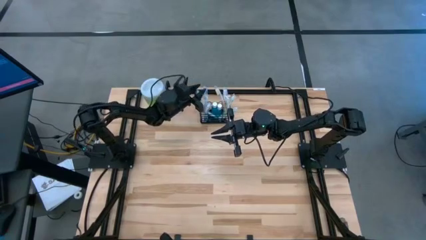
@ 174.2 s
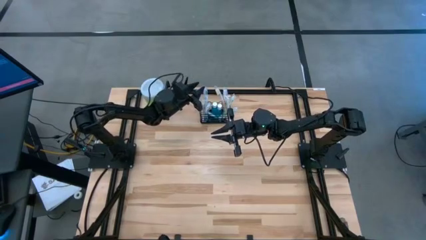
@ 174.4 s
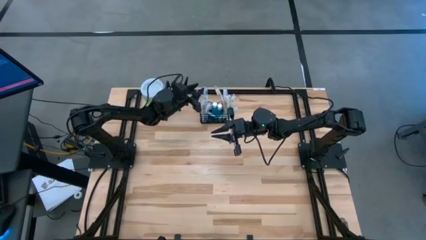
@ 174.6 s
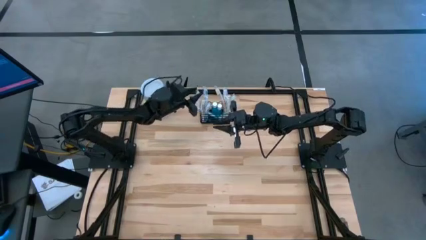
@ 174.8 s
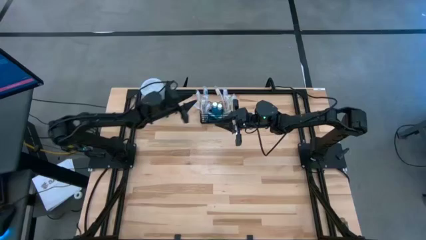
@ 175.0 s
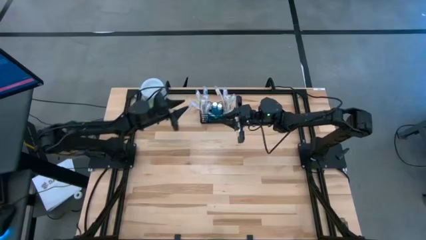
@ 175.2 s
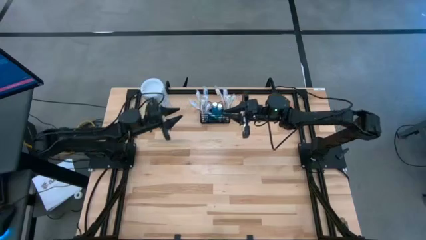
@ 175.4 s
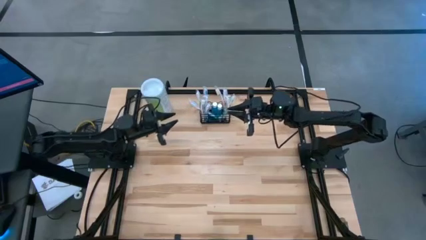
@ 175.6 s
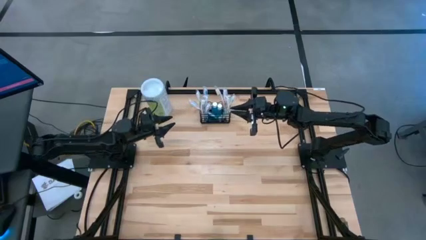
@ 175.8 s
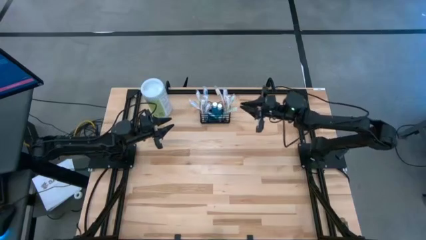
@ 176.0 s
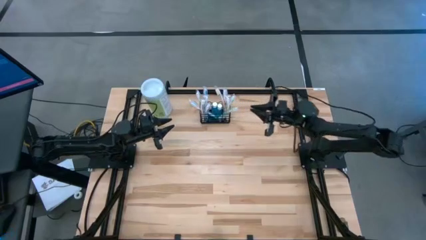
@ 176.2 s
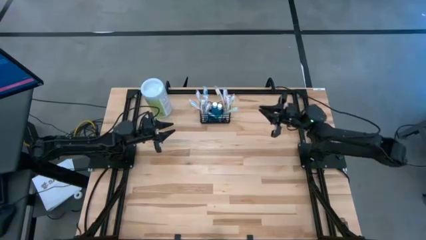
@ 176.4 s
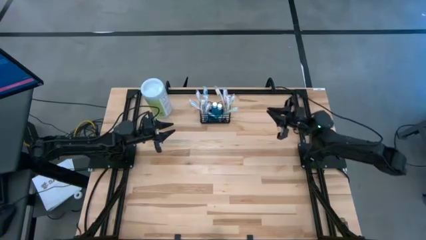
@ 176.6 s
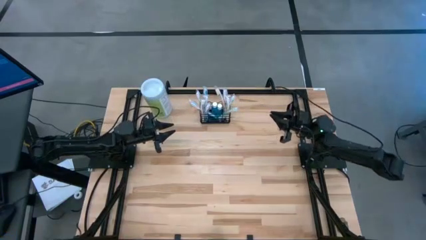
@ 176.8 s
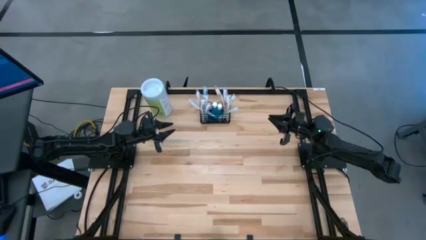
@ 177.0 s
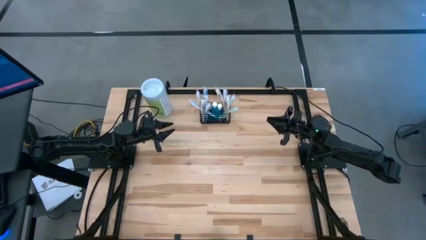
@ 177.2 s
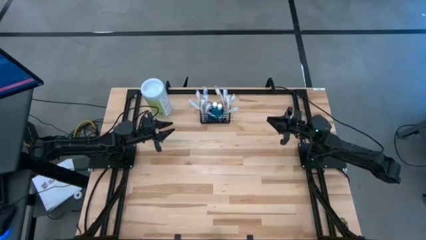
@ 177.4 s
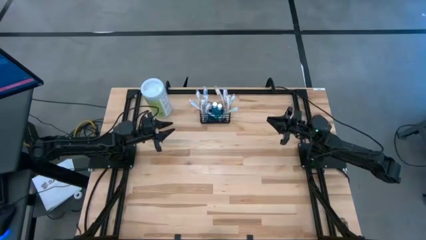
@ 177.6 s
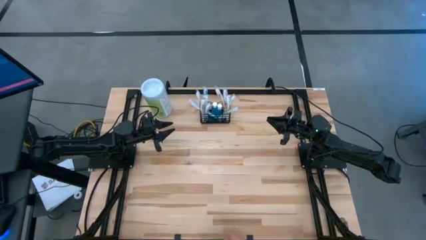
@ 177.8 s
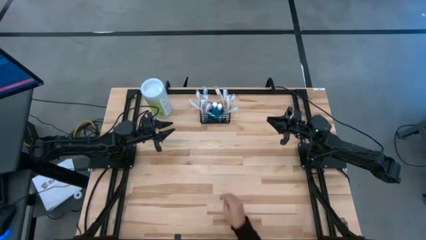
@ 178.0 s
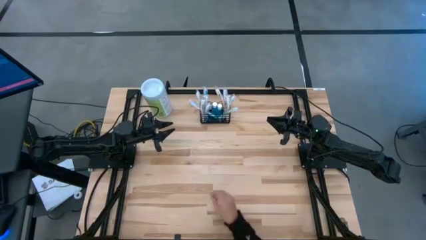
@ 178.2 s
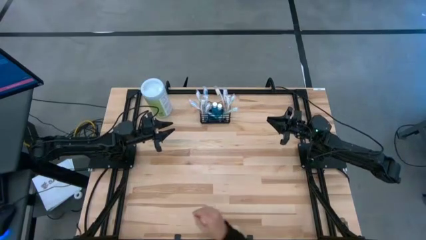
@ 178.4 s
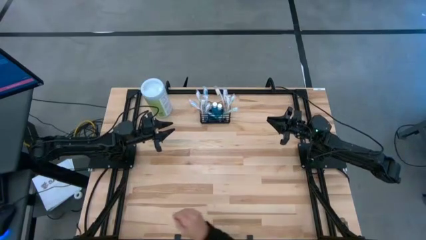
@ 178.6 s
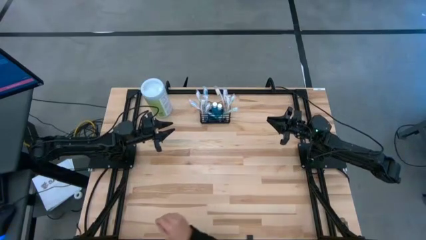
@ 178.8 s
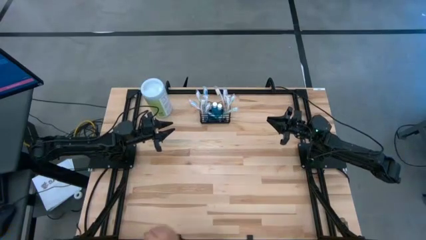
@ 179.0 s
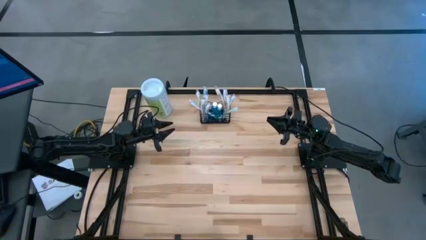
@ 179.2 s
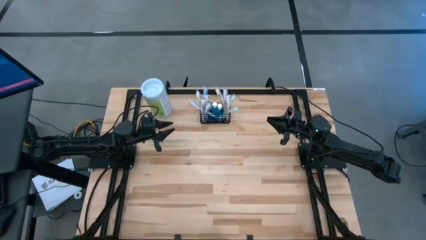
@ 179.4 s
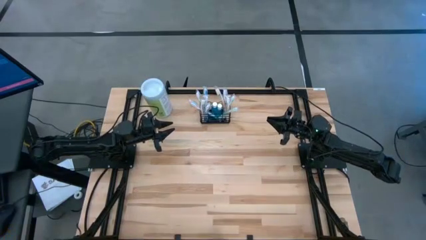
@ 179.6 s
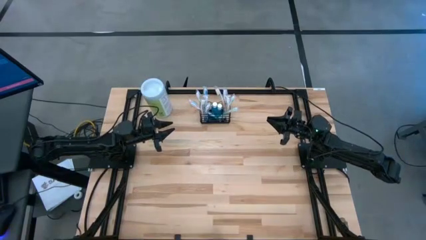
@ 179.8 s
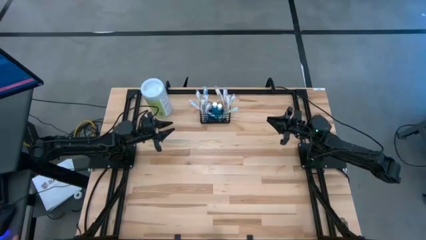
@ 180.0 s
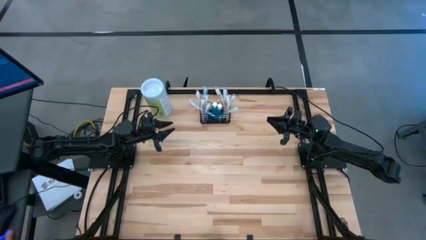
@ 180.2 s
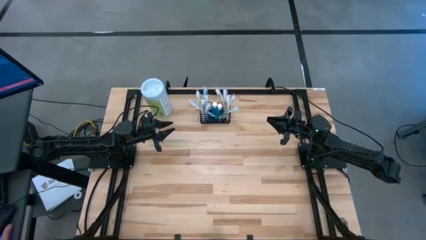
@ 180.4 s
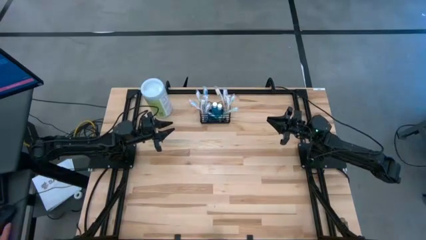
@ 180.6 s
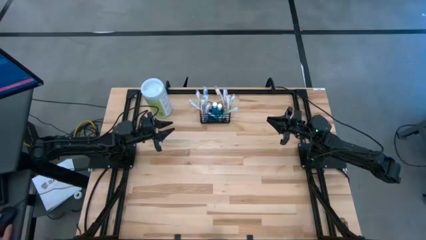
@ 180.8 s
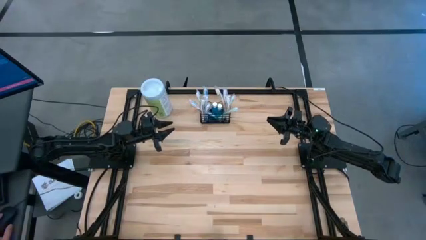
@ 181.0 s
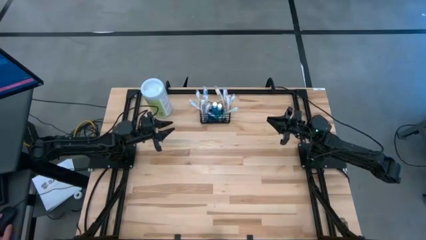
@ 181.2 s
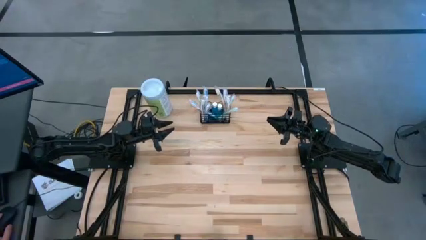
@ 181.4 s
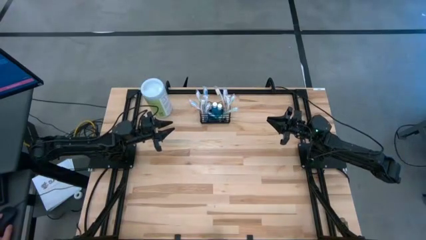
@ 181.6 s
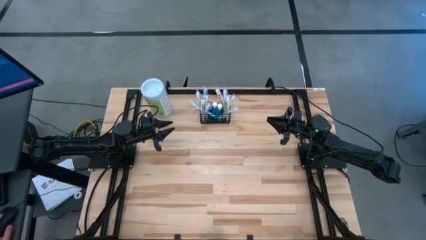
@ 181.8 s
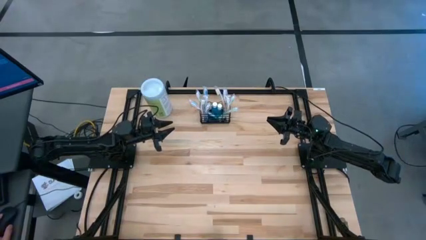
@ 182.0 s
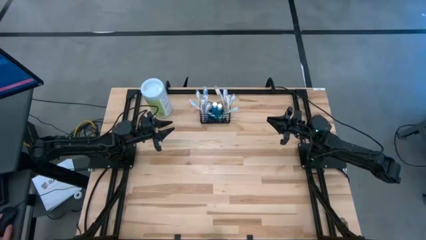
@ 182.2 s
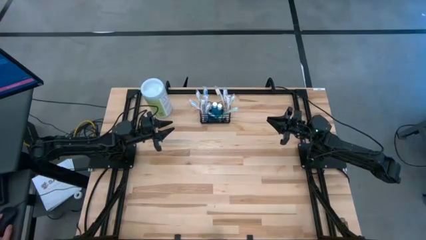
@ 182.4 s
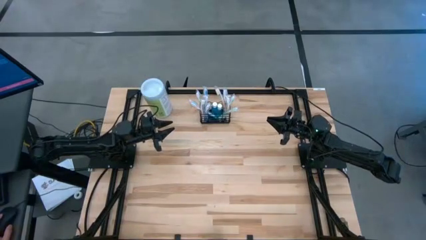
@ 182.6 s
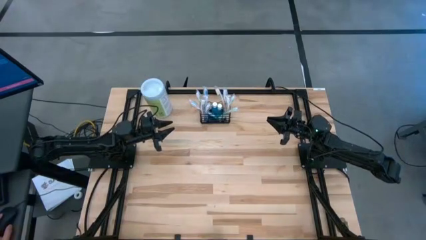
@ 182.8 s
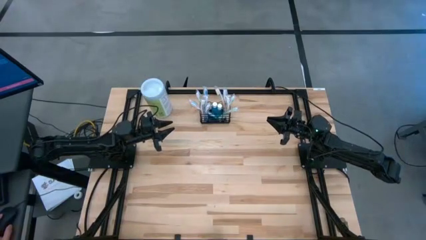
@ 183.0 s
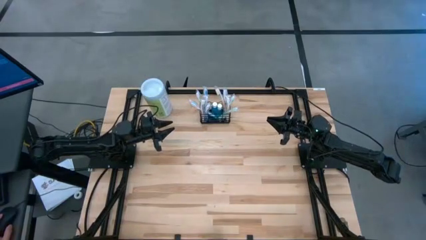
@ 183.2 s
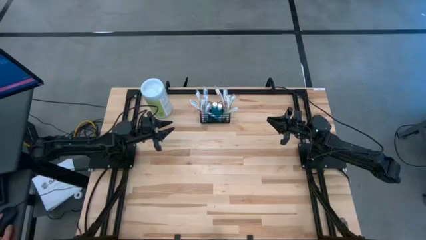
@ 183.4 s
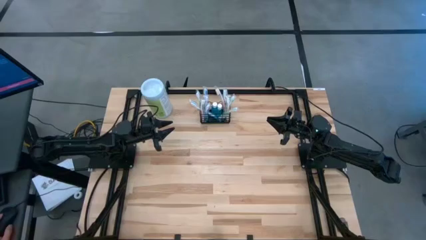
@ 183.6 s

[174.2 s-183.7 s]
Task: Pick & Place toothbrushing station
Return to Home Position

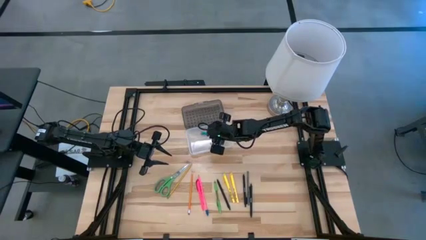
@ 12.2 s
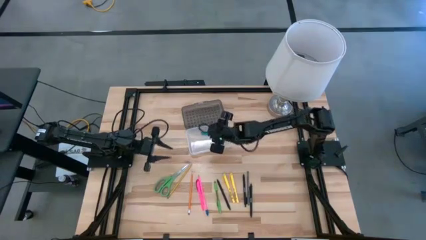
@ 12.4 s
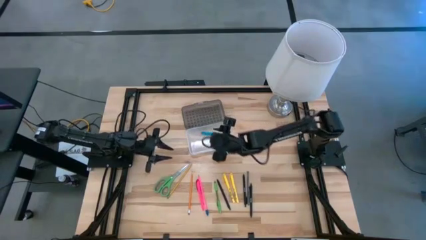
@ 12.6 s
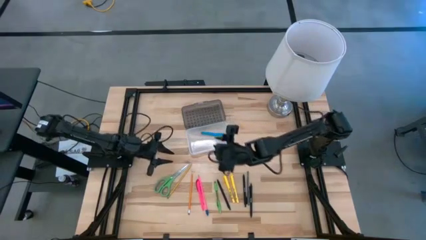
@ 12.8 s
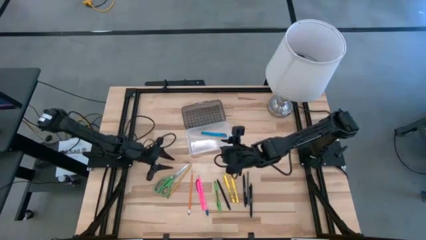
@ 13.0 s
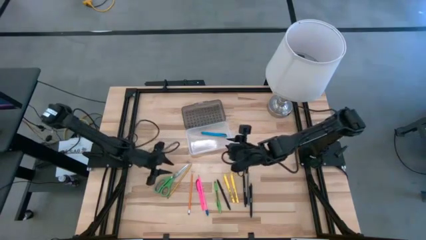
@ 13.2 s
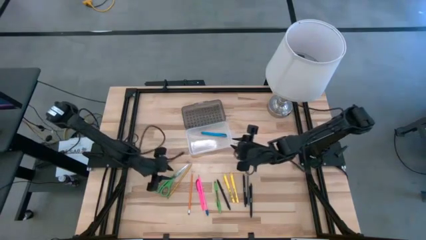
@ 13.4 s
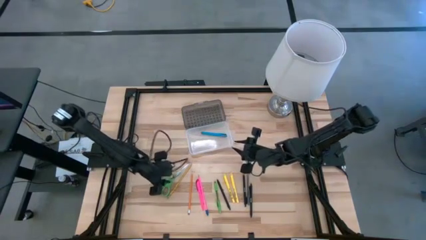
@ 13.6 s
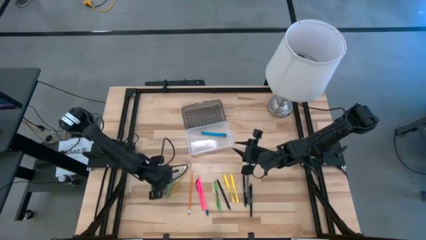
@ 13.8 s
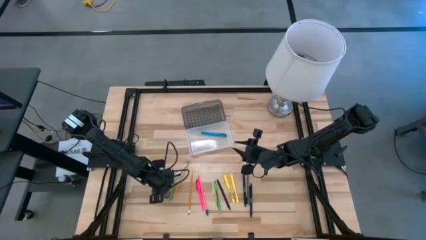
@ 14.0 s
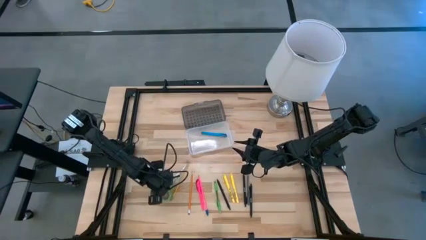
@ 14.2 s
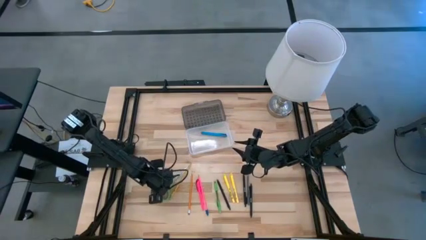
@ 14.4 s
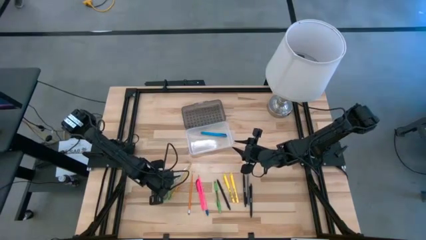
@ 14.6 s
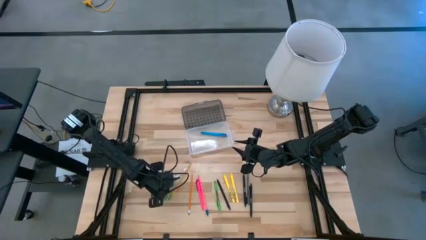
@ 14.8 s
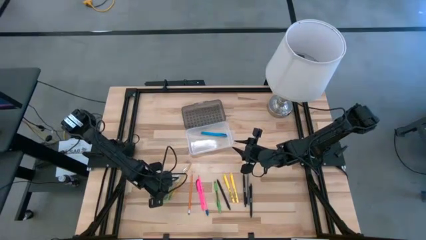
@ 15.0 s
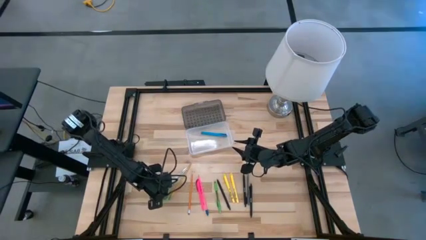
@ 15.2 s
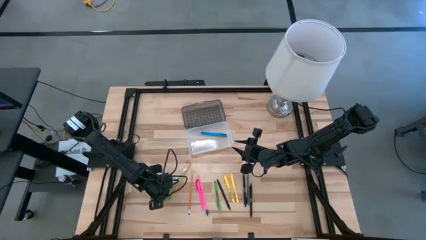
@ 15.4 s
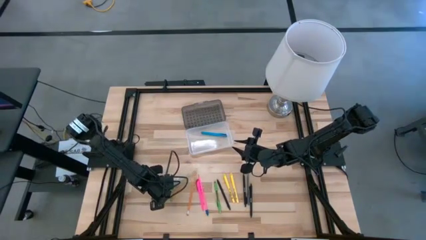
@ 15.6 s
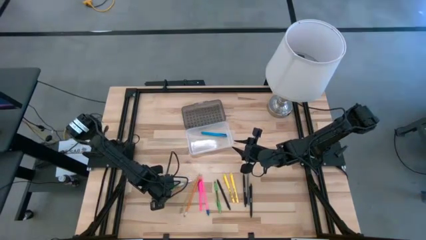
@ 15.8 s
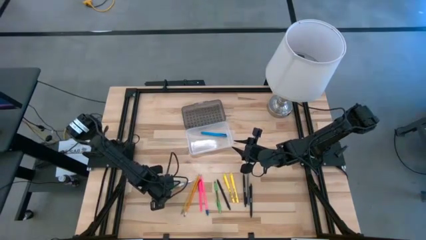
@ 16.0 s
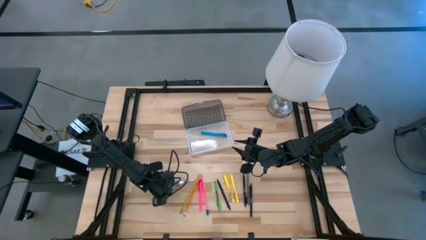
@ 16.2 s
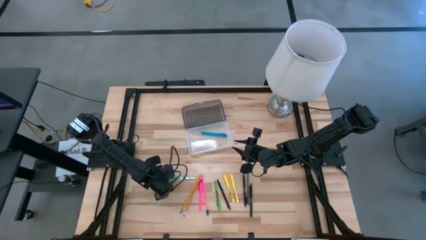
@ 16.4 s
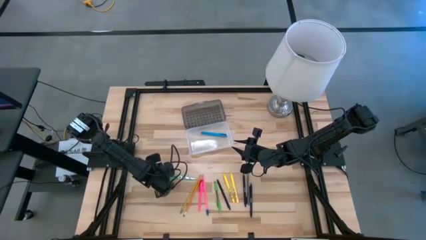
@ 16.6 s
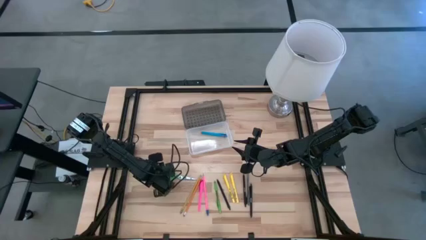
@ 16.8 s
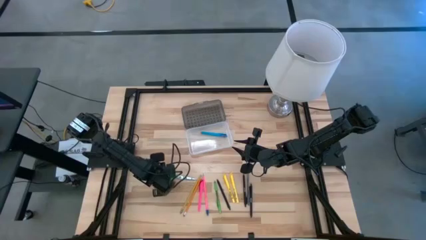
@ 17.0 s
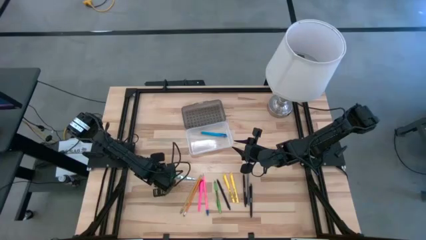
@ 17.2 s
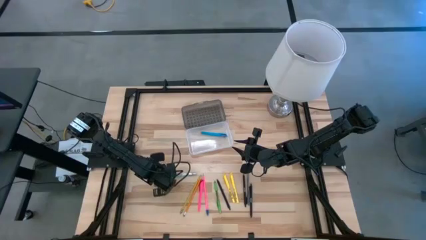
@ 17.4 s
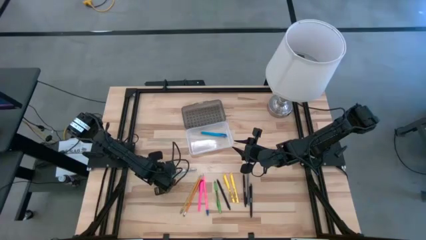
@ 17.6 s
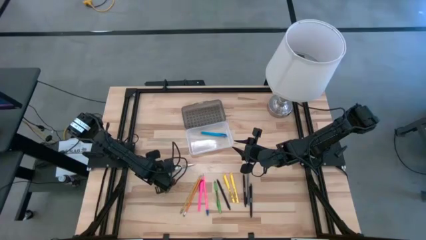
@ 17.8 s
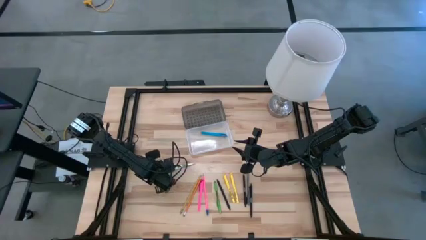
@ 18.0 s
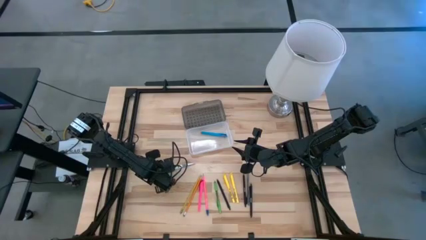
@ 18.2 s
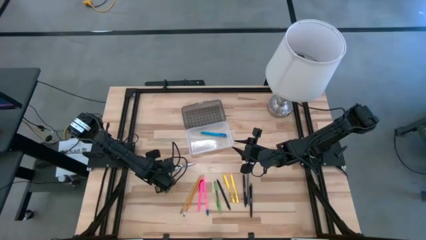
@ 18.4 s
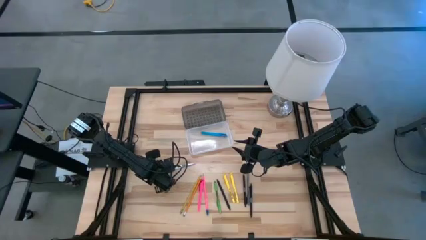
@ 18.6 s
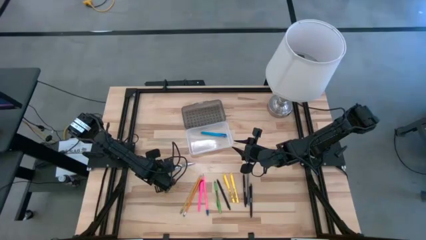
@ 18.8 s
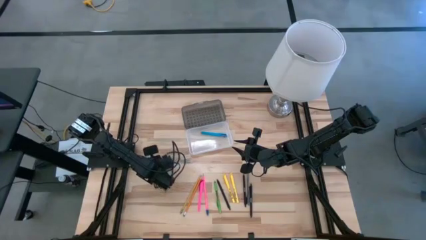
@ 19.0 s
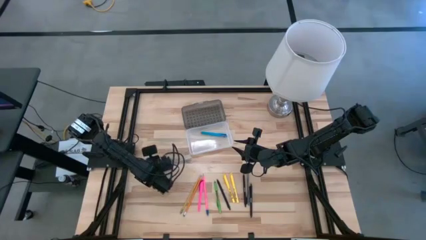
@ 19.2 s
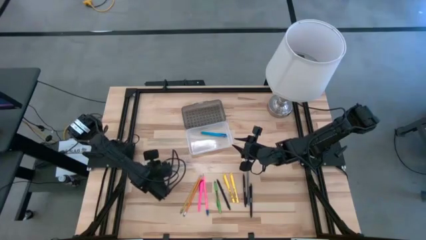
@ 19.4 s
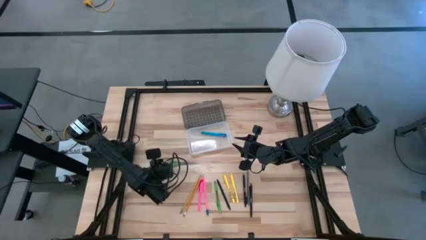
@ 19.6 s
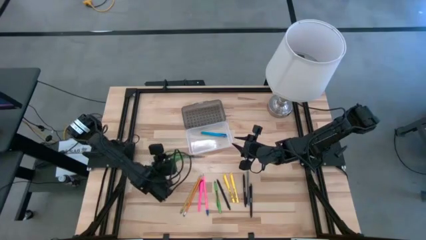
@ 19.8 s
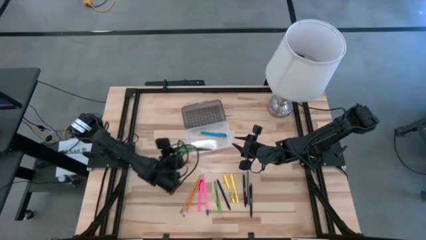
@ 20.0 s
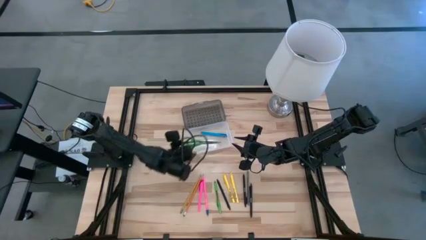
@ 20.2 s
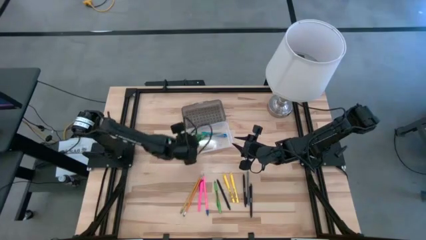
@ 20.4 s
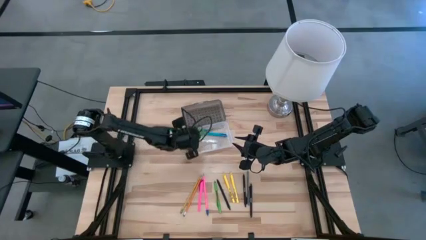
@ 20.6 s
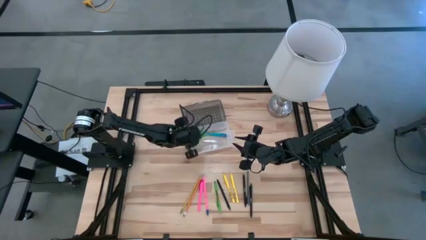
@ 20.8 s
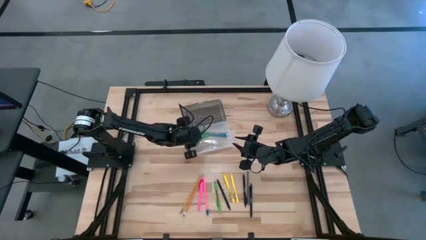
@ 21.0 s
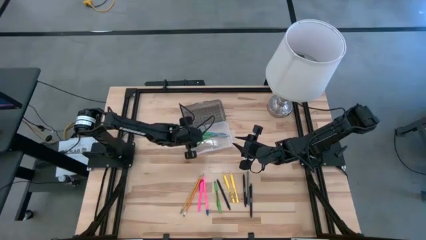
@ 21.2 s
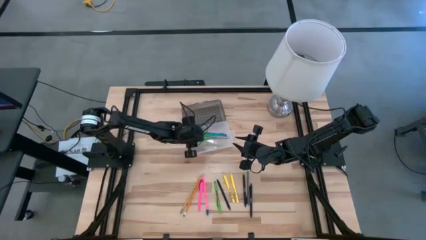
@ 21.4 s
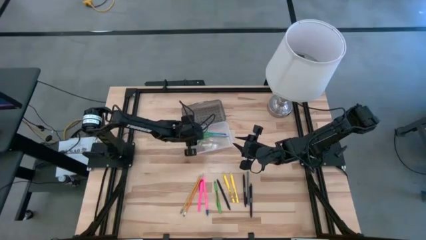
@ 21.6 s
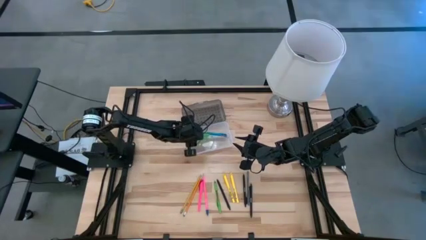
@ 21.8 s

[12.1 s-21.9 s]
Task: Pick & place school supplies into a supply box
Put the green scissors into the transparent supply box
